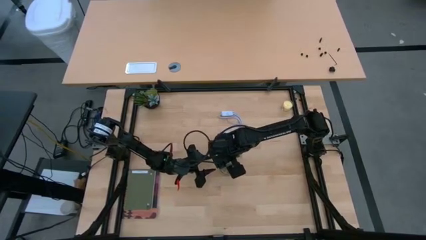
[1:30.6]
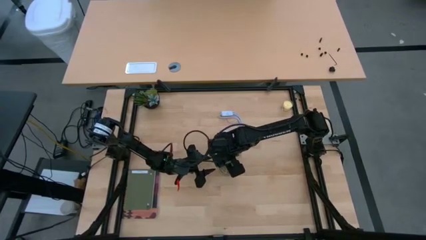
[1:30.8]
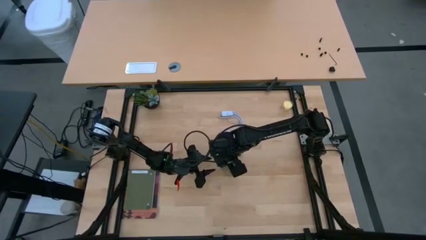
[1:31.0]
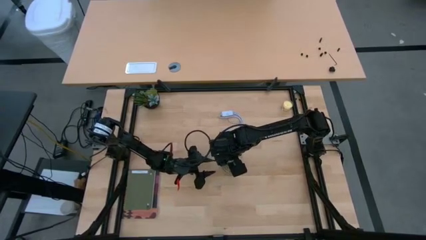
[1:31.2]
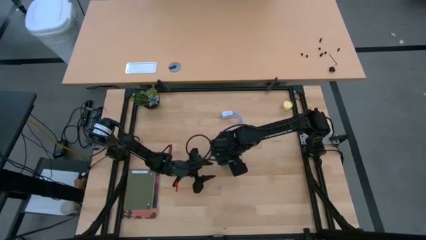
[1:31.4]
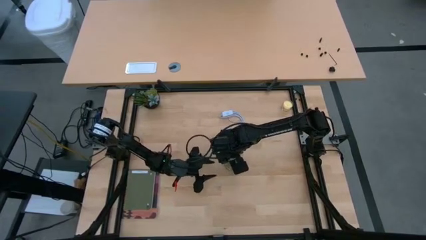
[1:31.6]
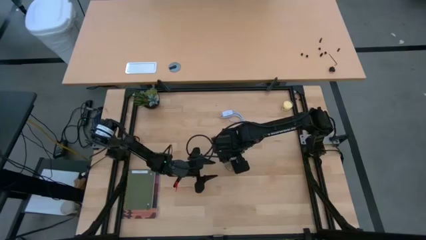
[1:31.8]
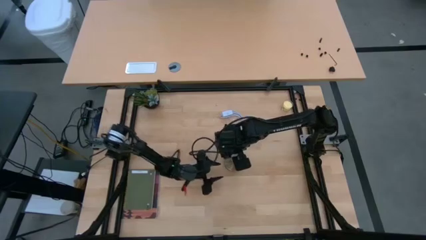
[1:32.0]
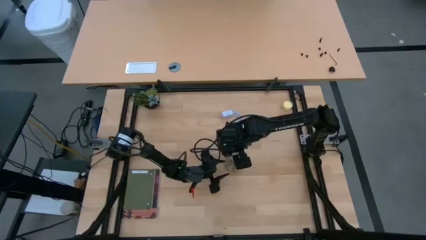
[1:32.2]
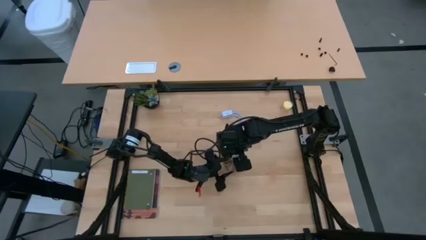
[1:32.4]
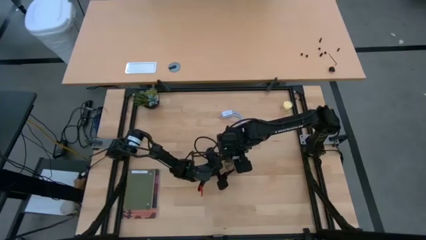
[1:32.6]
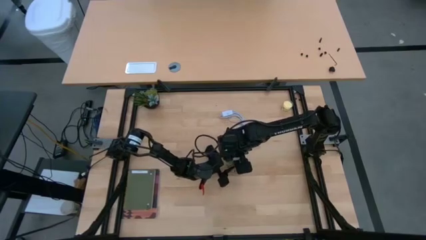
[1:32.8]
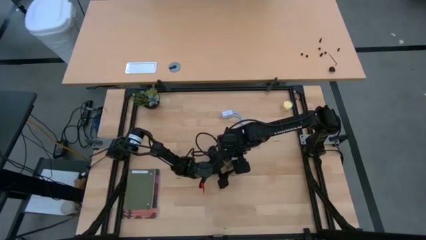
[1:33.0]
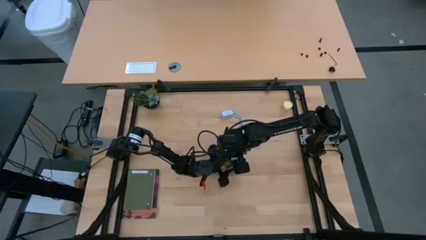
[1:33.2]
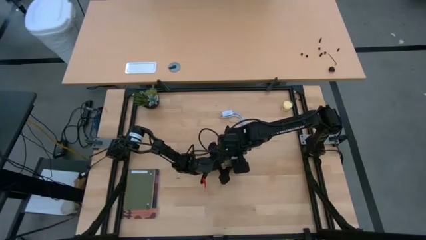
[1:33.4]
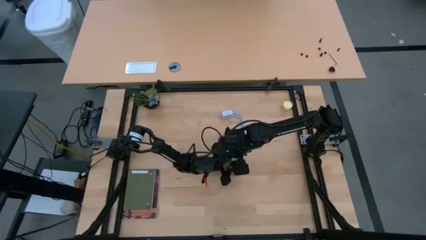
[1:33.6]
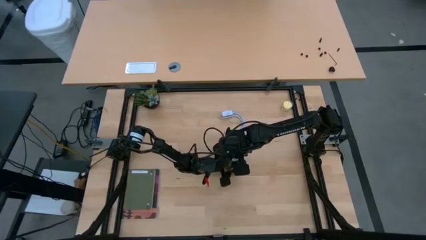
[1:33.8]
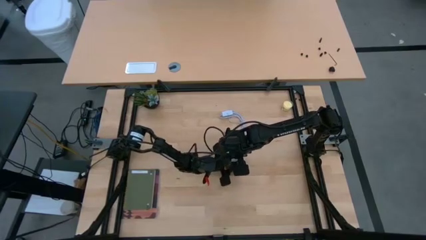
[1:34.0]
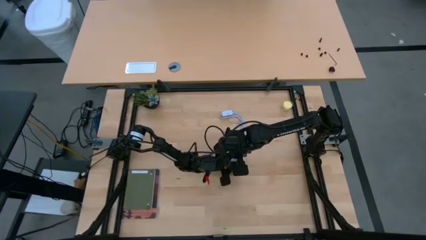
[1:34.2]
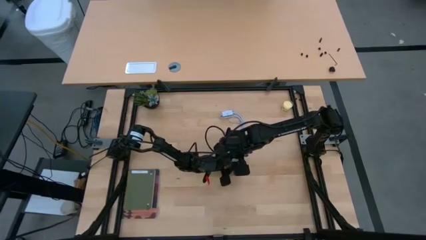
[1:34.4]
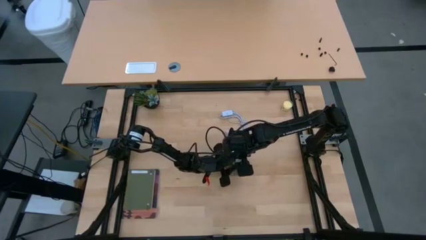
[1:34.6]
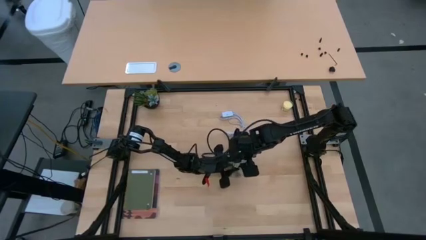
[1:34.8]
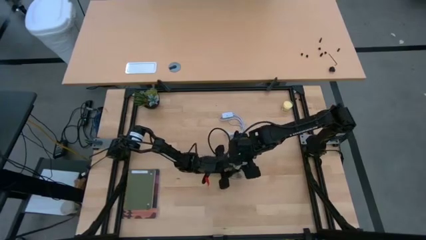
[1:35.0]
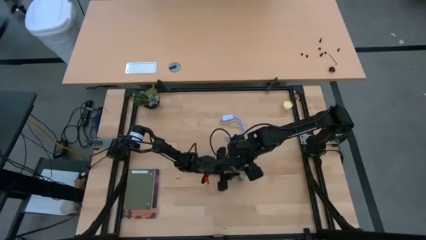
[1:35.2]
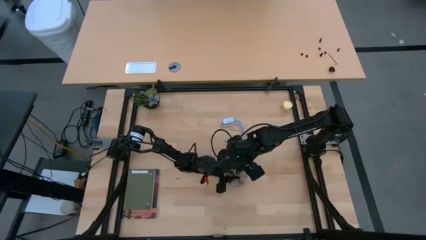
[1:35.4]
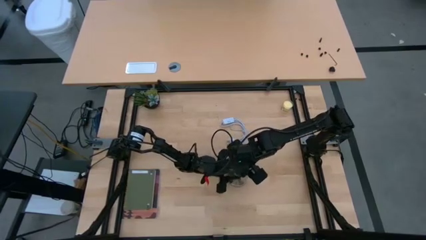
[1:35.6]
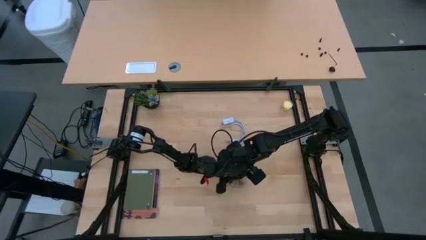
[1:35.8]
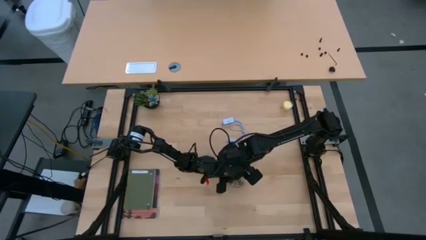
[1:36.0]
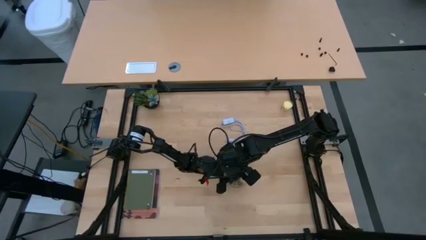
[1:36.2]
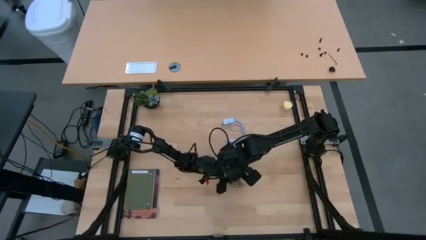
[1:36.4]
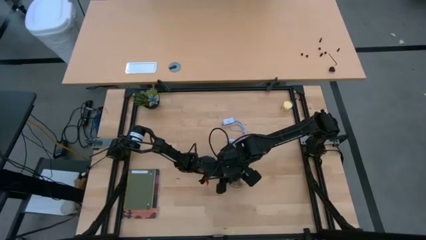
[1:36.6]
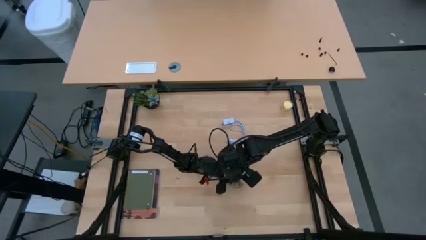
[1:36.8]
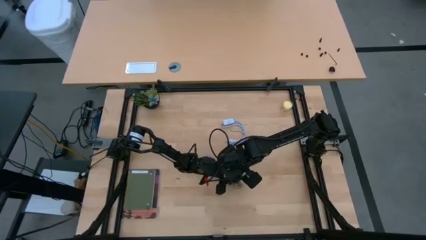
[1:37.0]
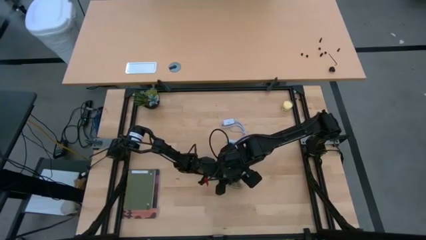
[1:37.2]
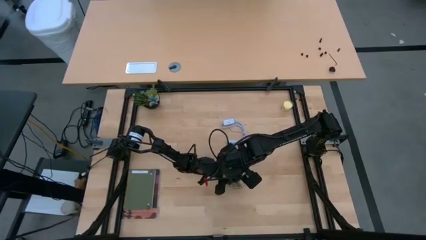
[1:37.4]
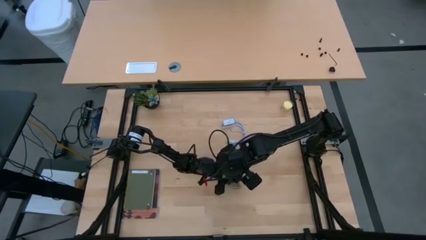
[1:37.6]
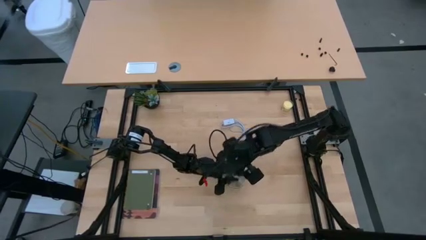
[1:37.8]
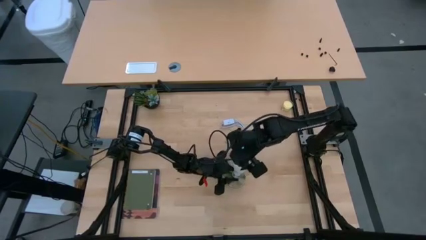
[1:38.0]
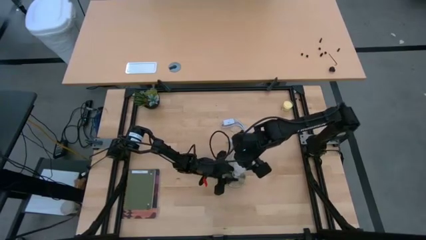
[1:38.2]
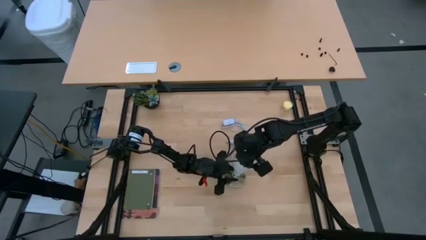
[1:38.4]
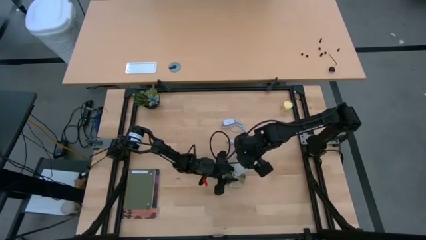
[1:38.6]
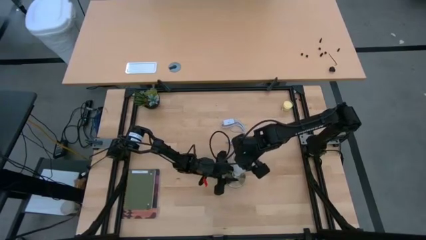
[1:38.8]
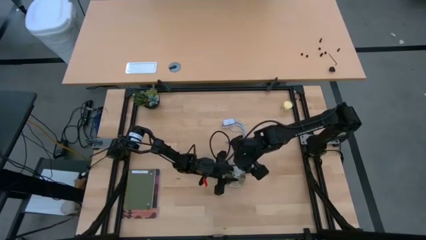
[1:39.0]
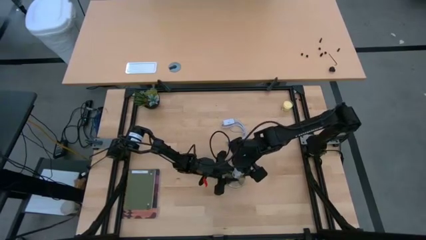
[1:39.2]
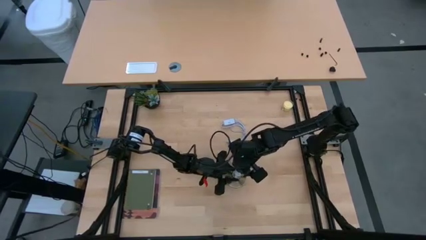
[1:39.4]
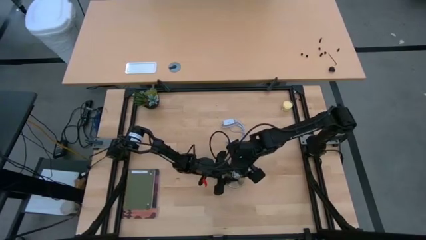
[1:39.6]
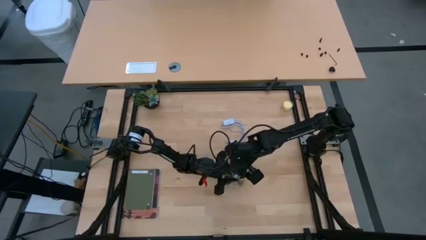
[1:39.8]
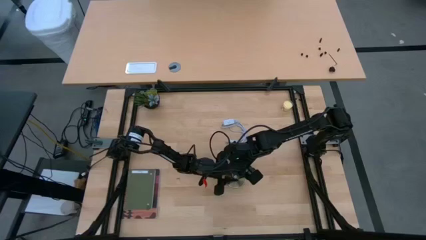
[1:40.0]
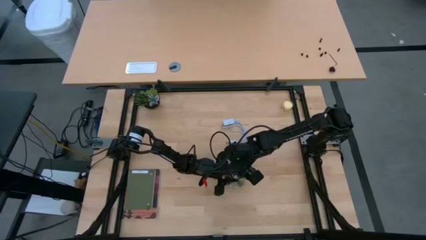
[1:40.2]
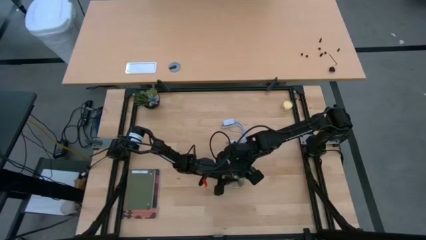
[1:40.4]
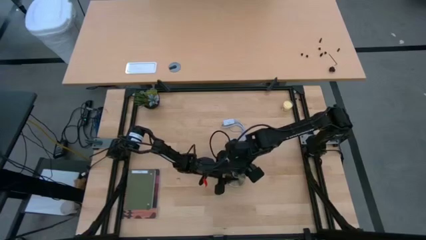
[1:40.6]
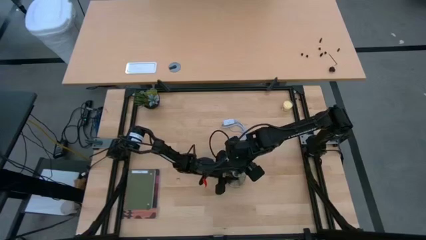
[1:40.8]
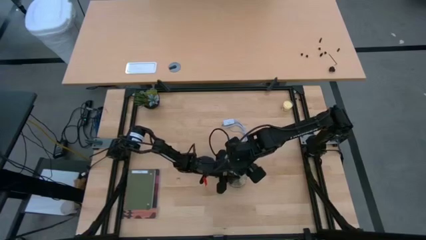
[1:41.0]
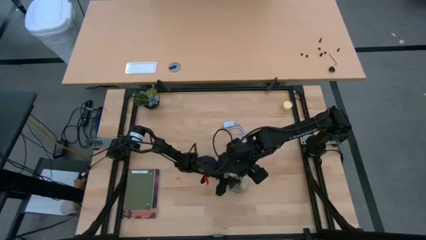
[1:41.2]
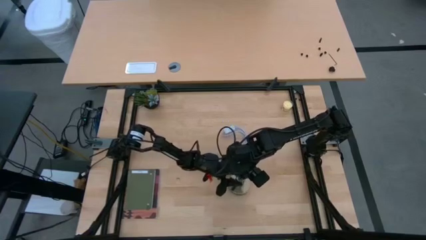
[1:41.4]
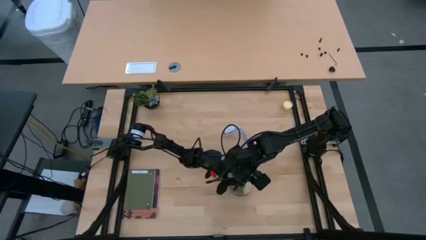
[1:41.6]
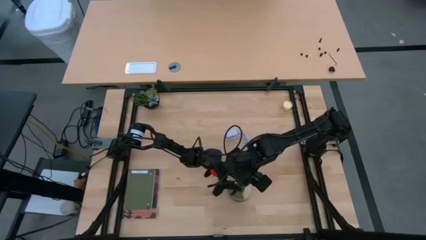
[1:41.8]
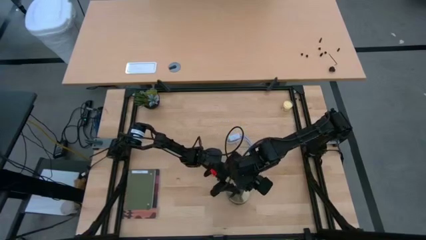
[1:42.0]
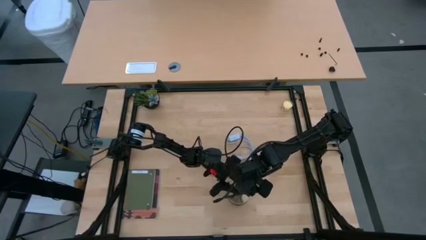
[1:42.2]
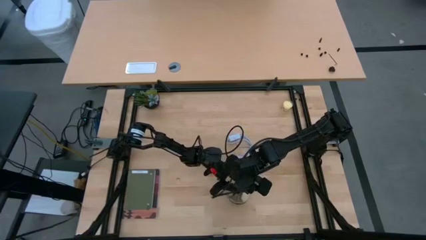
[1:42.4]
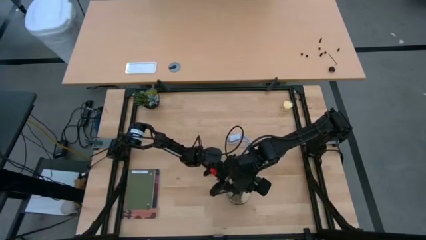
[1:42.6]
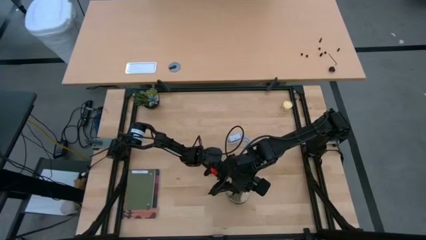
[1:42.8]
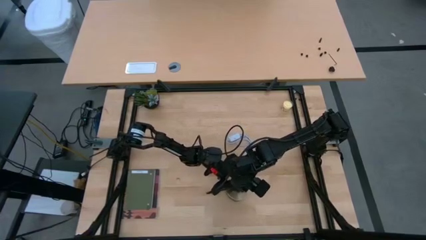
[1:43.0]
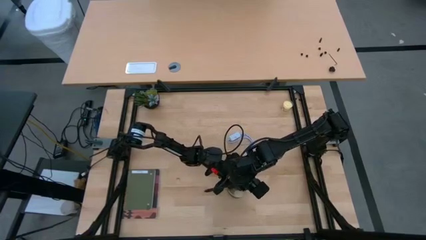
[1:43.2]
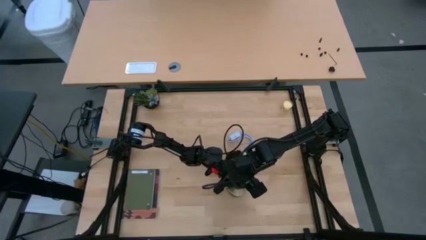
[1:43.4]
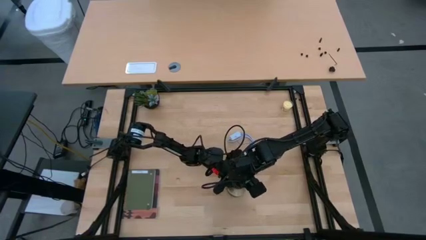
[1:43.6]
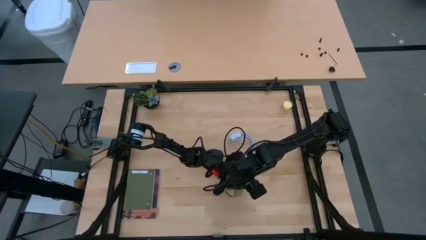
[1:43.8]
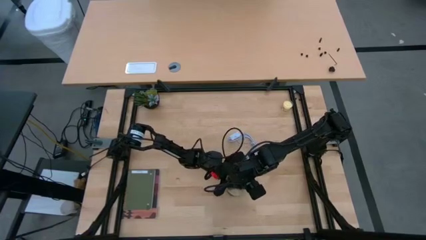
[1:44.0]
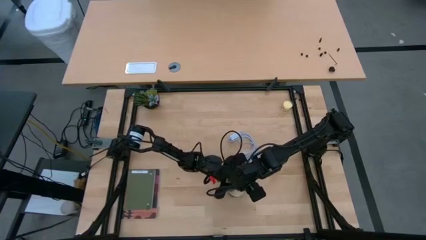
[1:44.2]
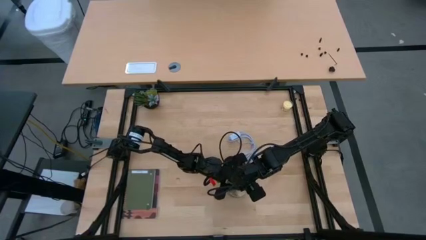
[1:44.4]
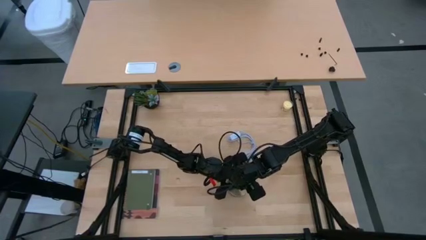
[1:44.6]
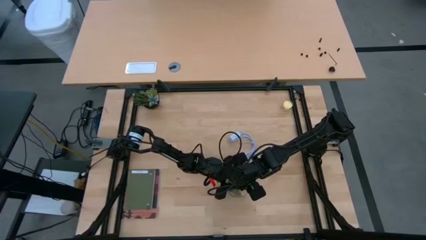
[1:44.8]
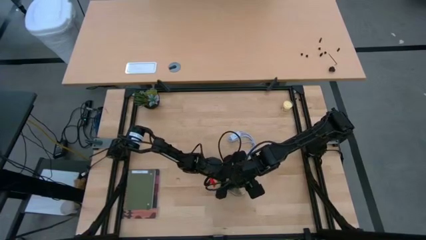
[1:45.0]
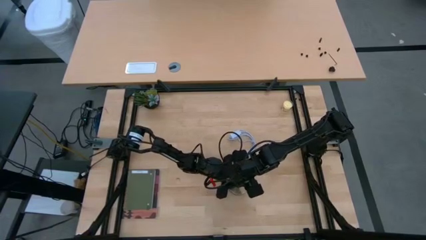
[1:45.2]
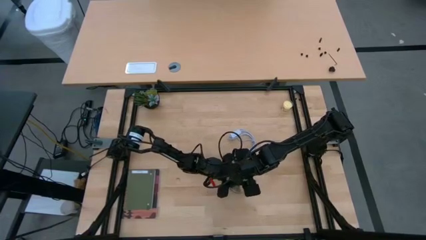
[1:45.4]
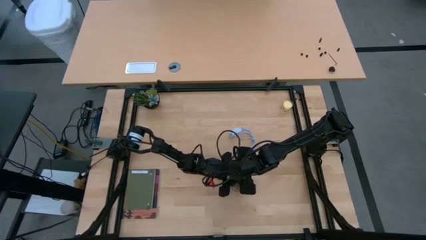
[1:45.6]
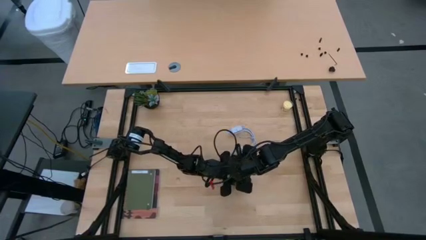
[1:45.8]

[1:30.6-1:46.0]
Task: Screw lightbulb
Insert the lightbulb into the lamp
